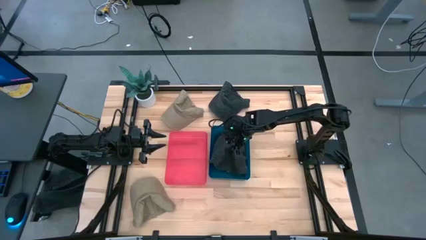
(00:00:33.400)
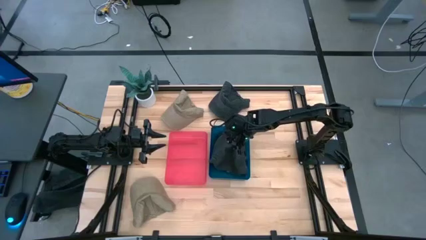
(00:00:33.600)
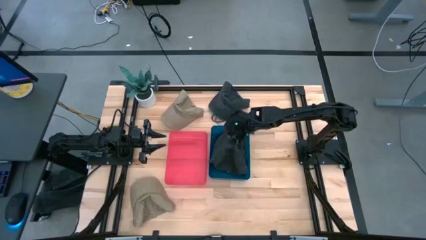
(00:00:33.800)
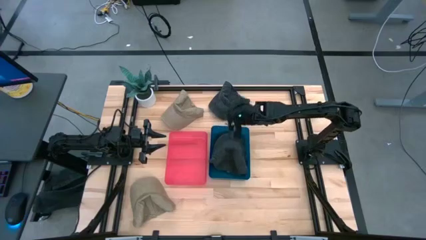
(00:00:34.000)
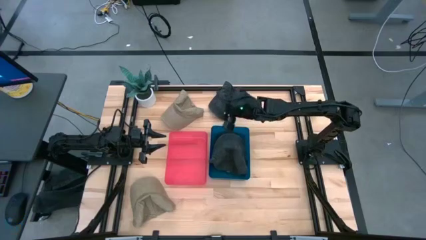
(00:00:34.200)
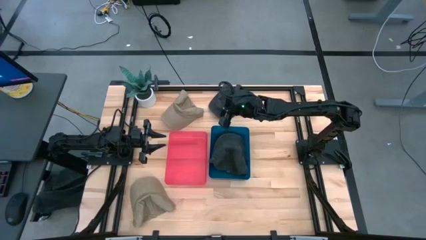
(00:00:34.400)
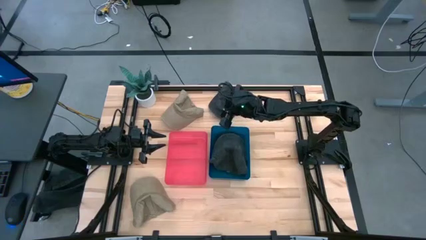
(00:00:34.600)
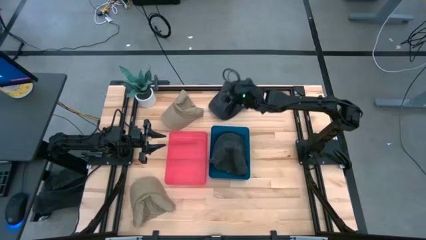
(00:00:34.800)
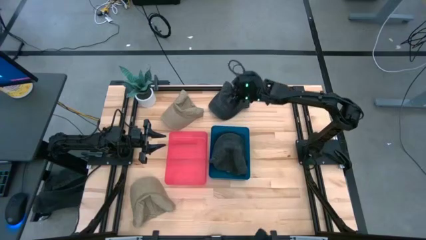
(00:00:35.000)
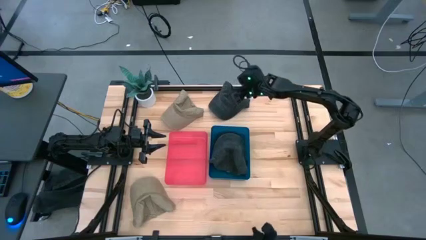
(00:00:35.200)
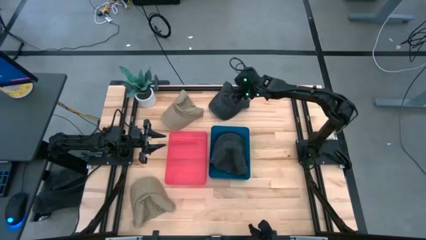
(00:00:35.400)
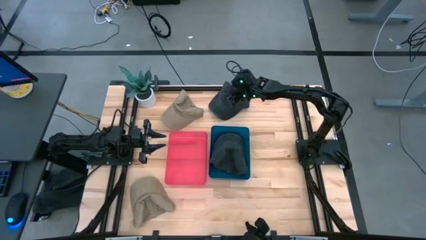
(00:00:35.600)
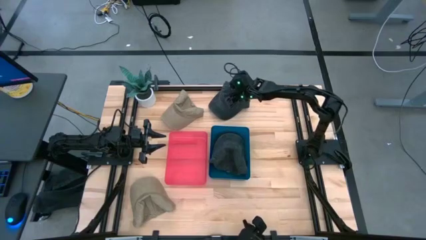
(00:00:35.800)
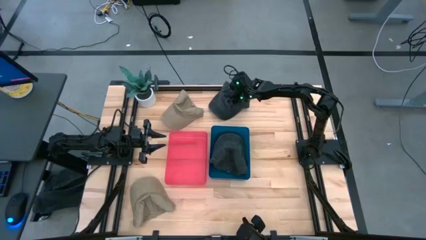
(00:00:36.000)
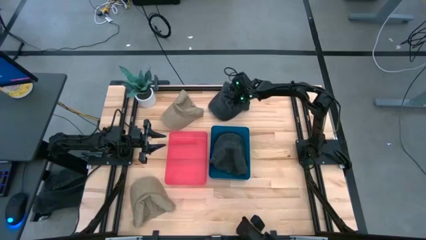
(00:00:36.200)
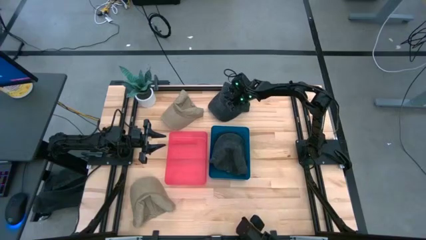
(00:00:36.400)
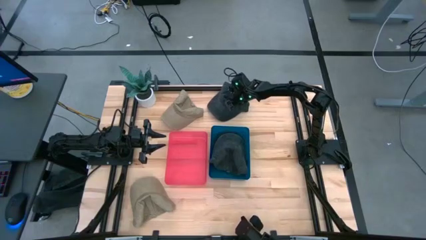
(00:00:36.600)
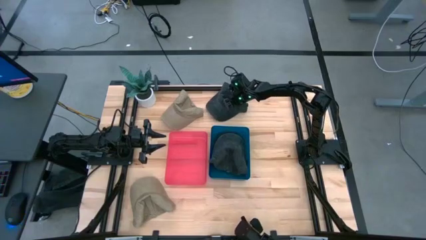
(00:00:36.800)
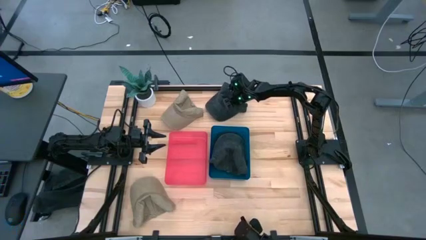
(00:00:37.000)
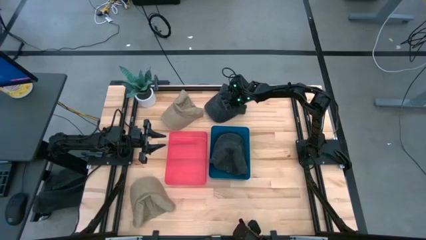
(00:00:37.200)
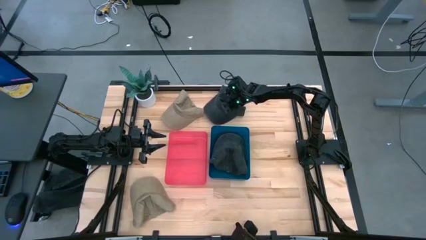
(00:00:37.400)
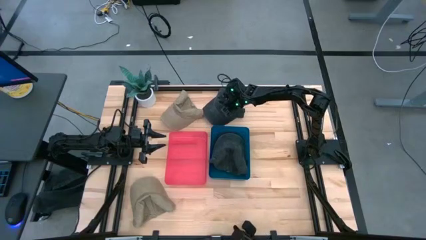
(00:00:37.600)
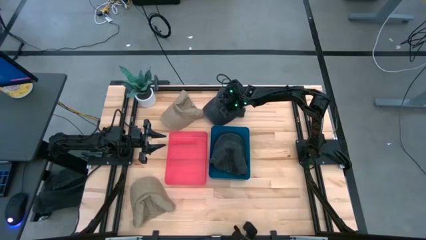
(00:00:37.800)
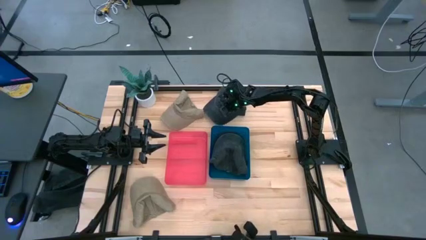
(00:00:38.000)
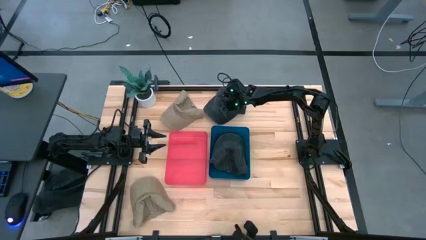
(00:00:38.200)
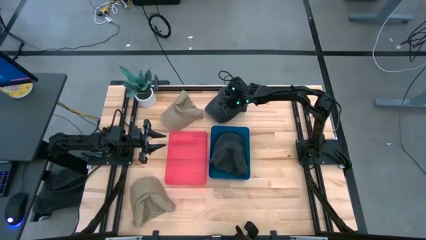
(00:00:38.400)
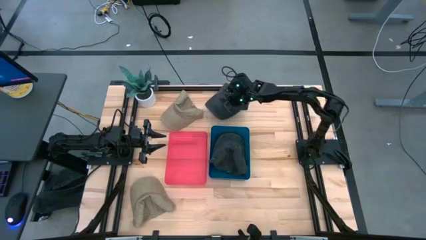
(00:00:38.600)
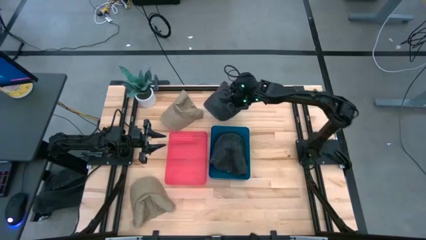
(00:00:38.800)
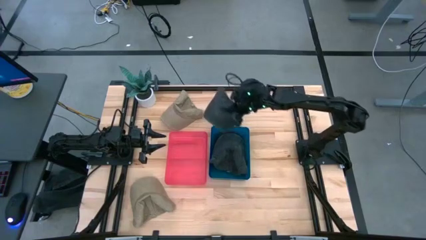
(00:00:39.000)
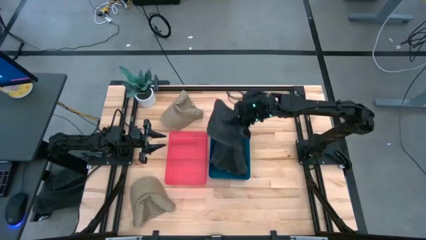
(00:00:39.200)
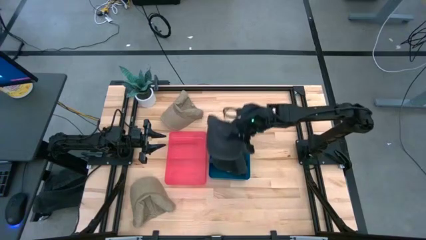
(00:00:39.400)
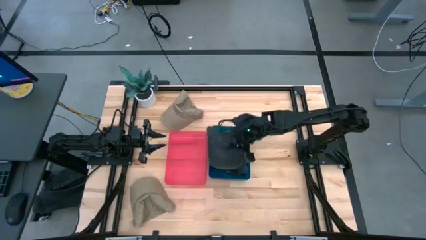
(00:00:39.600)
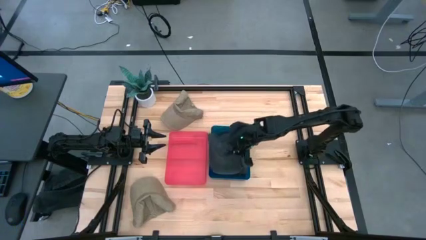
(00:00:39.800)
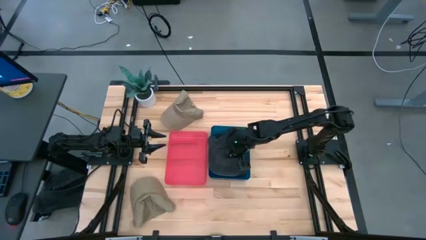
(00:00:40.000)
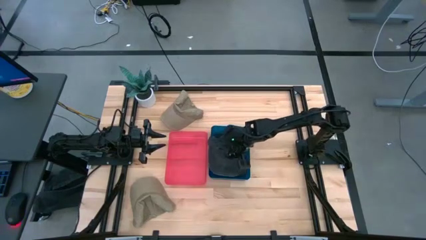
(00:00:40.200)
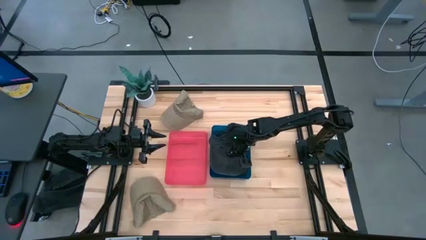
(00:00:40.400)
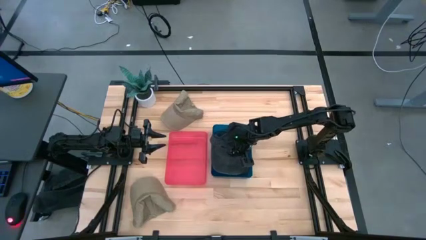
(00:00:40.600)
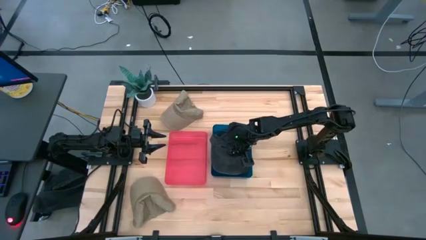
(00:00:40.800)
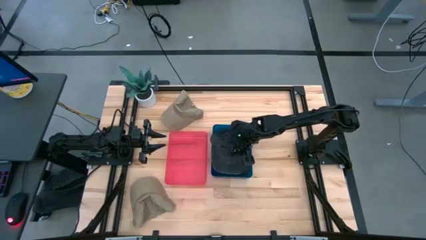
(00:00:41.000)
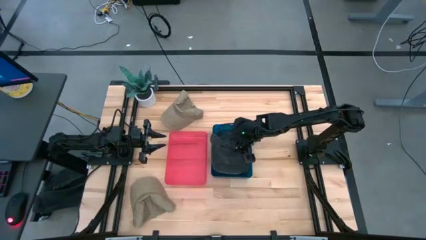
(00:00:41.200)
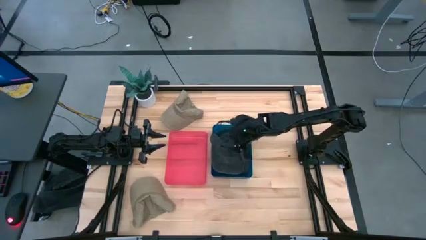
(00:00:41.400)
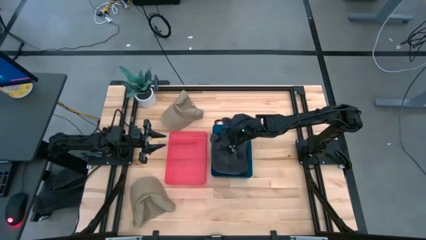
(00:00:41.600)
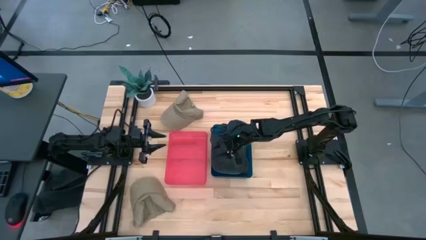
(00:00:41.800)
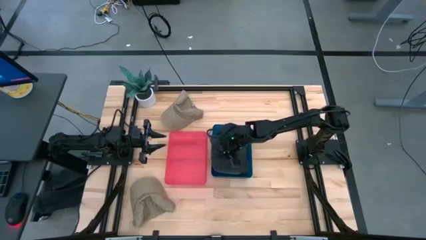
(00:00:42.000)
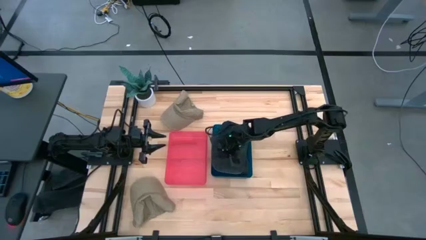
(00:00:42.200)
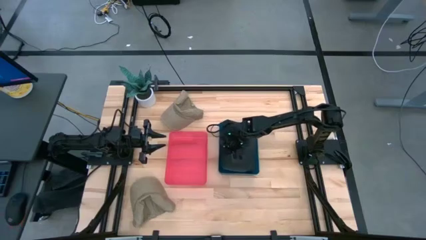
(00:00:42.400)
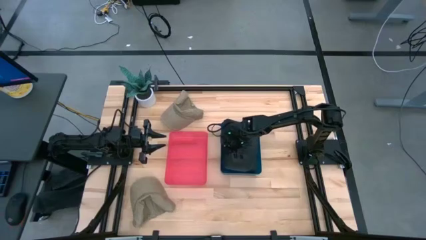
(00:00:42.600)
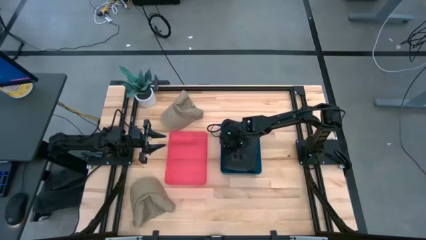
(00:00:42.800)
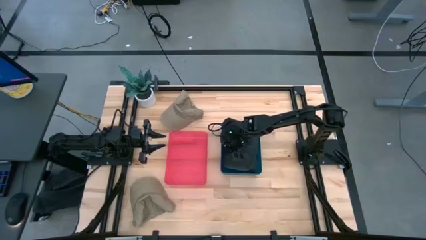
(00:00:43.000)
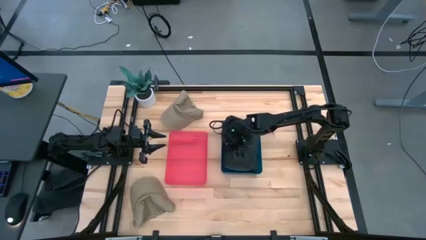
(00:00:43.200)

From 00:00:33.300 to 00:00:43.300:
Task: Pick & Place hat
Put the black cap into the blue bin

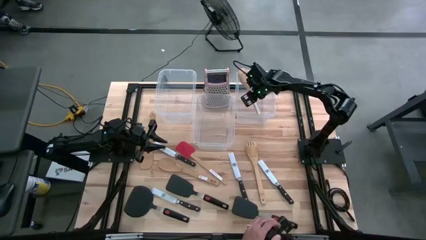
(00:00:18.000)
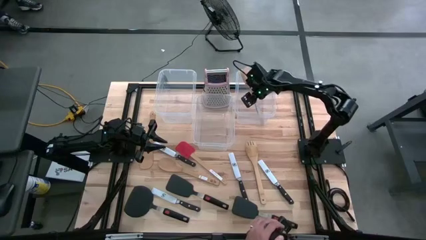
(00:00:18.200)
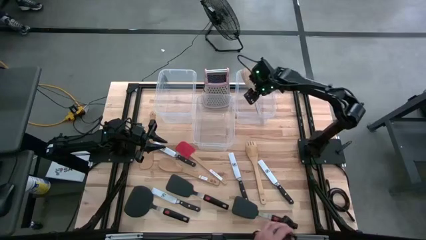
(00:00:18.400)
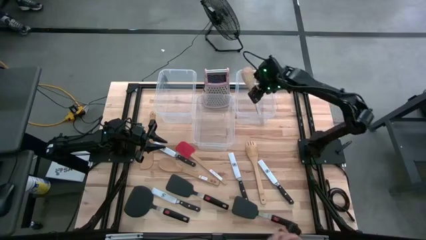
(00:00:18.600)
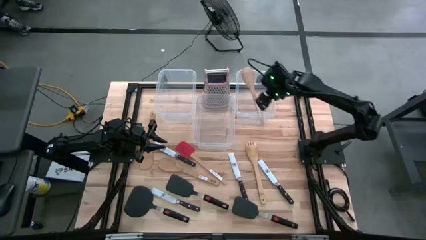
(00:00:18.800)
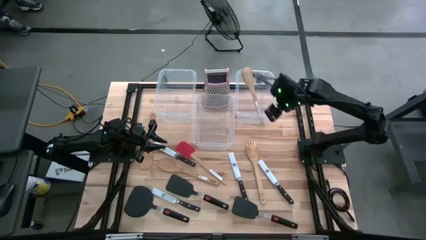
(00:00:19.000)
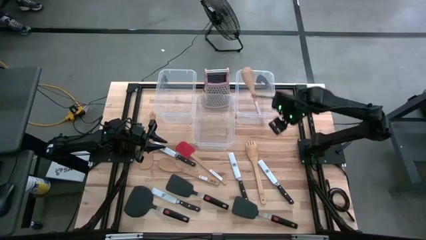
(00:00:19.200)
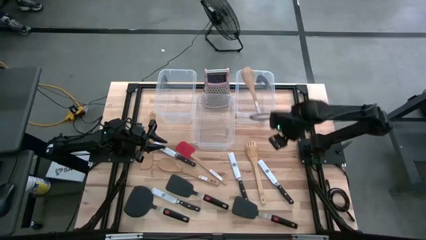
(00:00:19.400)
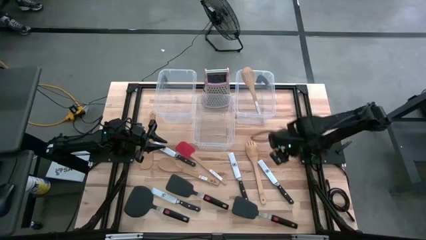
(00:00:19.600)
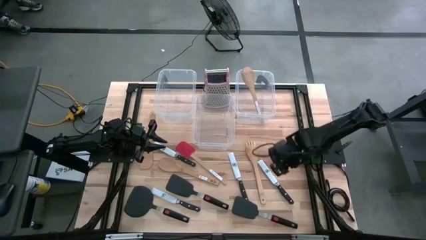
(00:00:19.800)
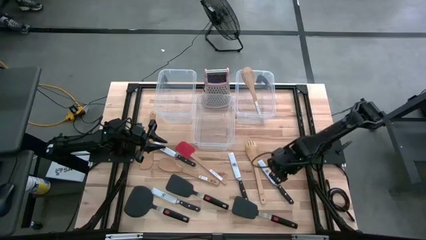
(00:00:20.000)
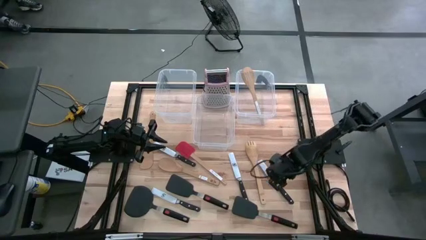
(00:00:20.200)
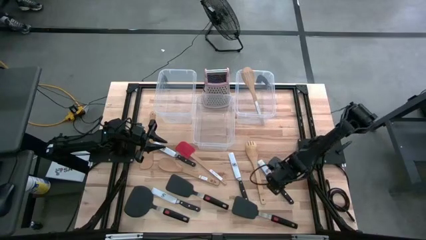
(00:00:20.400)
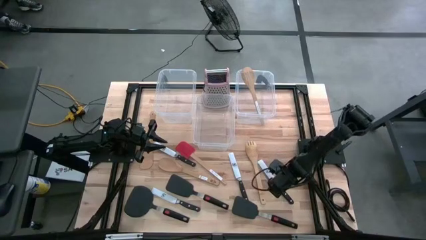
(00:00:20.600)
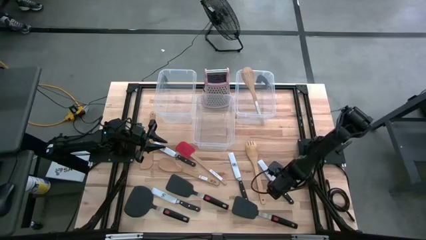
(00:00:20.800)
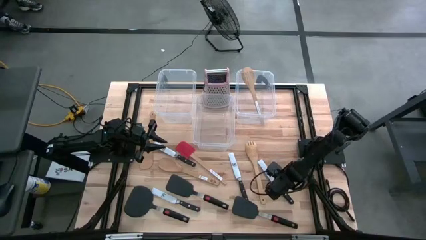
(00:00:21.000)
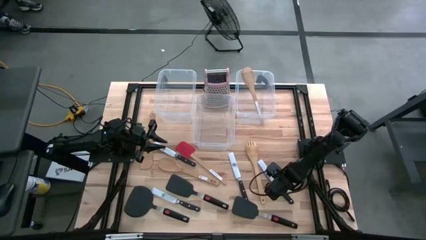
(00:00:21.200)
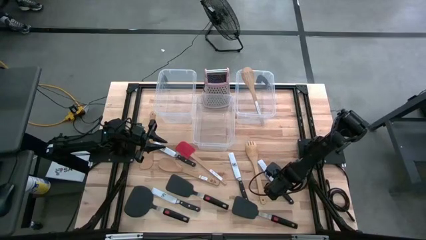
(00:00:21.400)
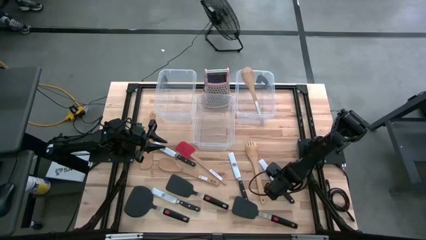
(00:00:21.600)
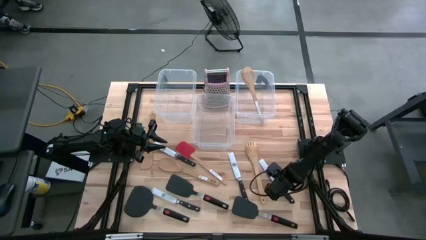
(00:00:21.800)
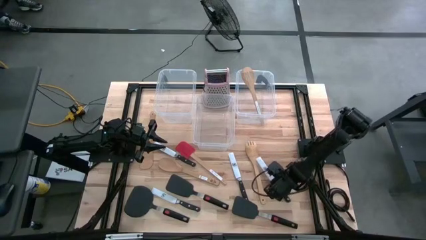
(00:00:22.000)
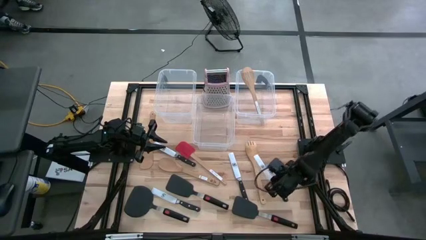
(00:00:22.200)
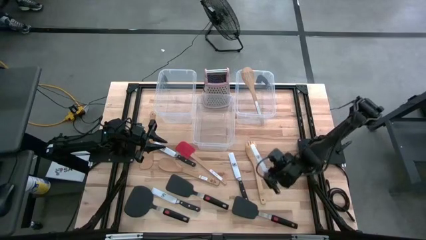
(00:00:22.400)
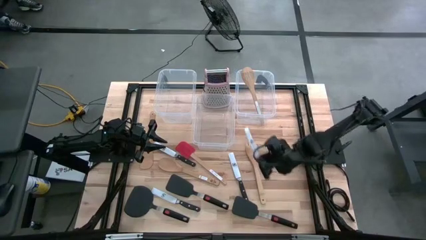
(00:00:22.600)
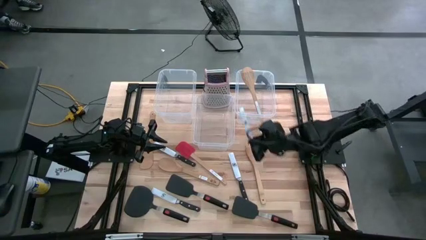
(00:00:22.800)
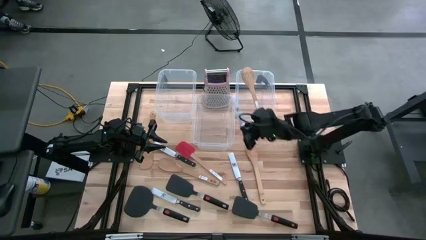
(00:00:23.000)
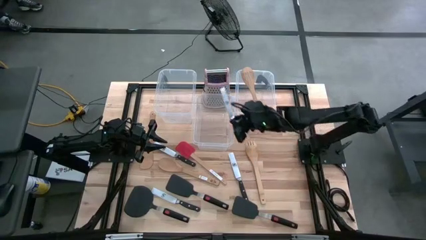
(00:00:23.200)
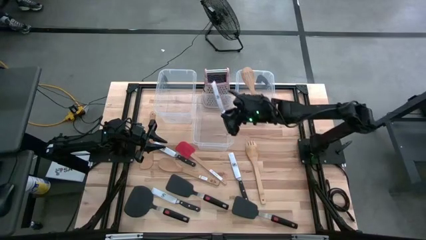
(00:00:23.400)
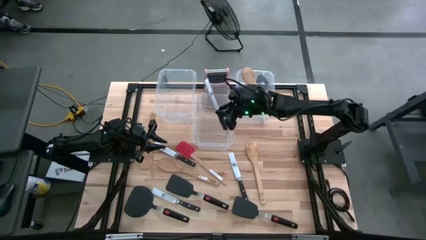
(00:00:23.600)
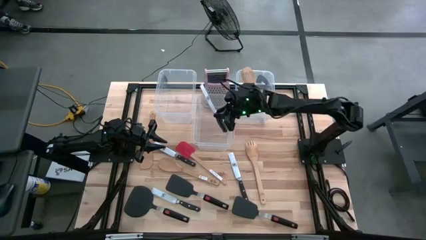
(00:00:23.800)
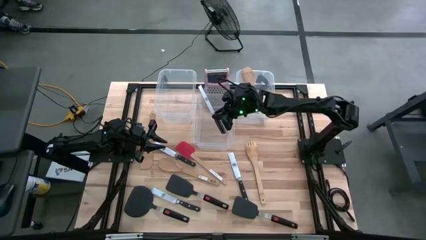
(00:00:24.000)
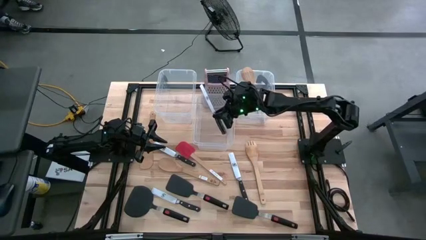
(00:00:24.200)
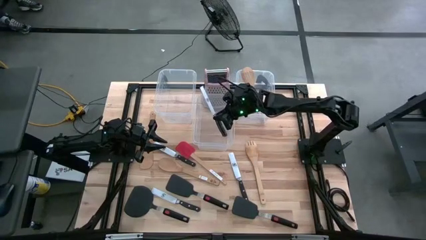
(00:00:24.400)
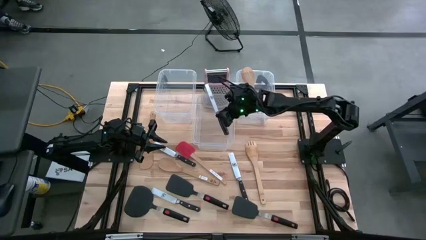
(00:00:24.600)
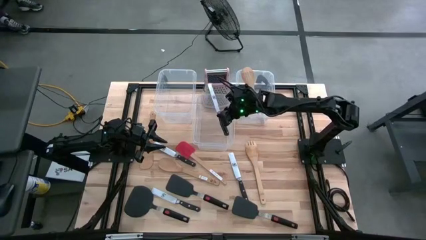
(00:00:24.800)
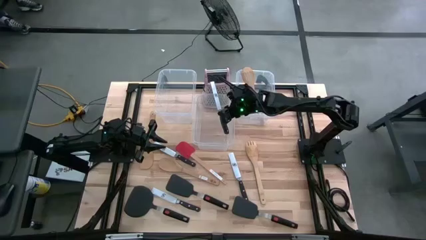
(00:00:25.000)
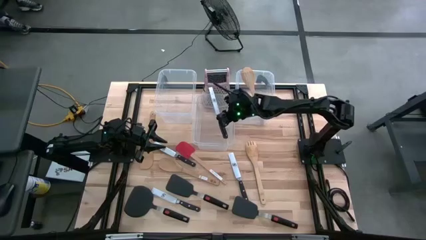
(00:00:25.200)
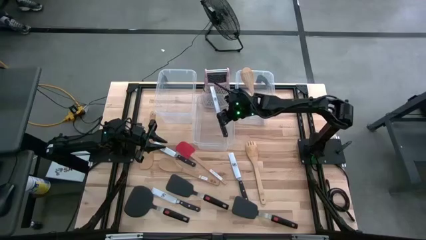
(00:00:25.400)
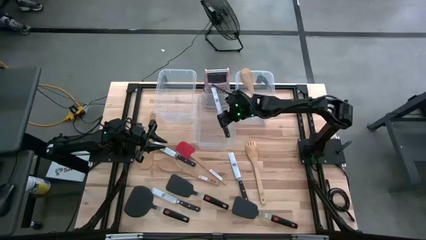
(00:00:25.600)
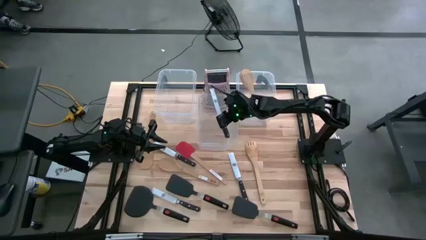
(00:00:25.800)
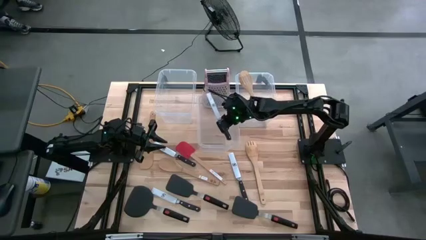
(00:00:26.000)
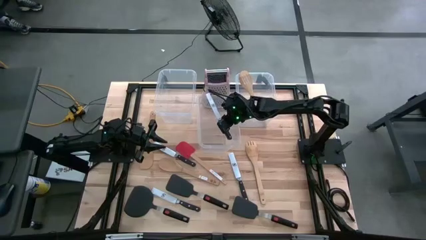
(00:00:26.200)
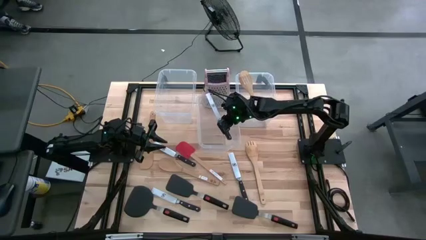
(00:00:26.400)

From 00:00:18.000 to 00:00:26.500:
Task: Pick & Place Kitchen Items
Put the black table knife into the middle transparent bin
